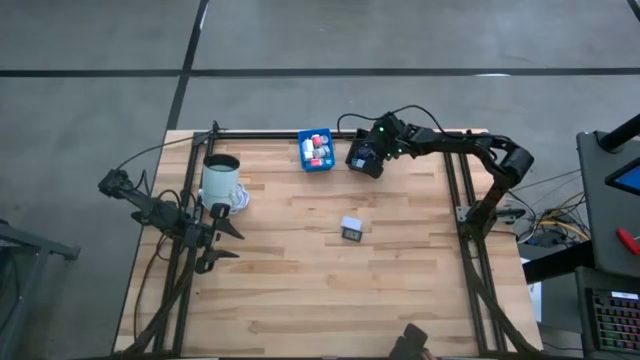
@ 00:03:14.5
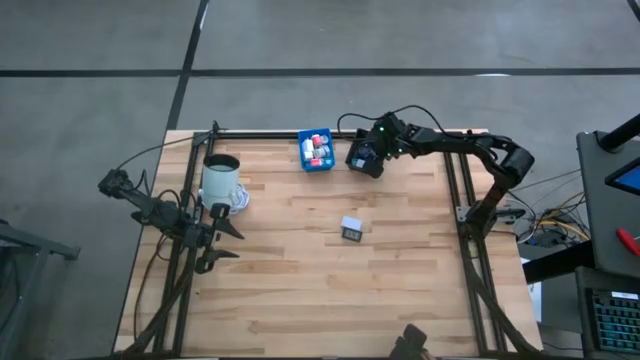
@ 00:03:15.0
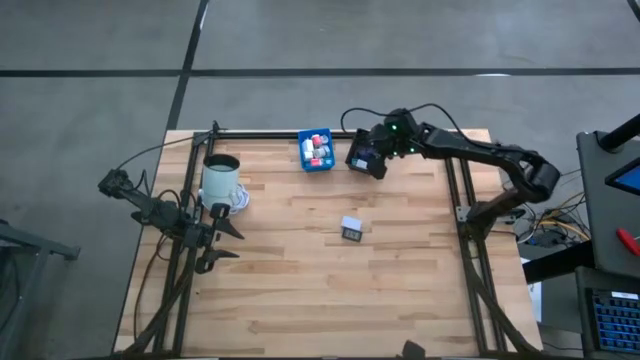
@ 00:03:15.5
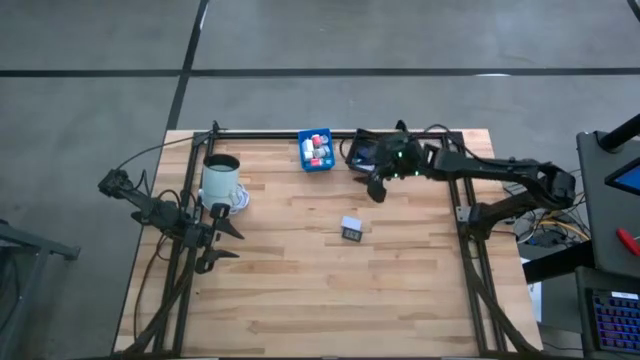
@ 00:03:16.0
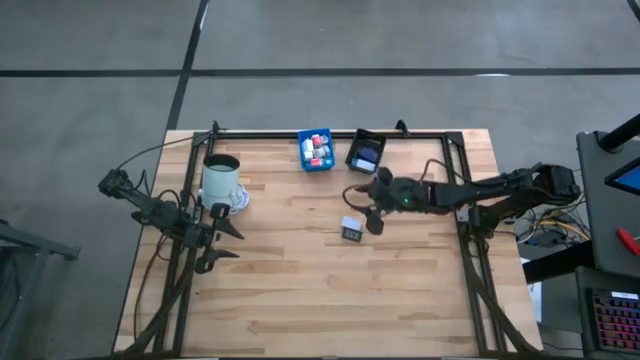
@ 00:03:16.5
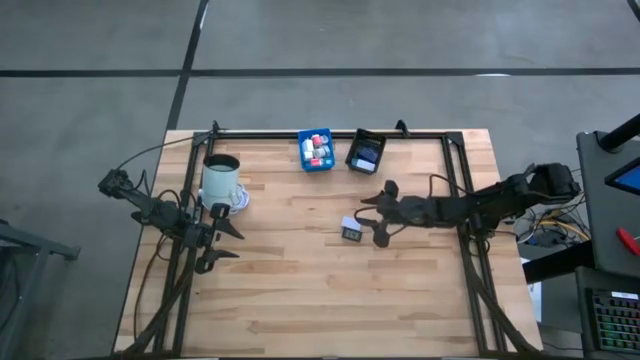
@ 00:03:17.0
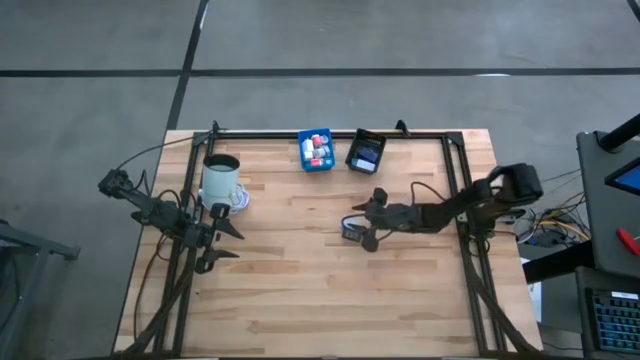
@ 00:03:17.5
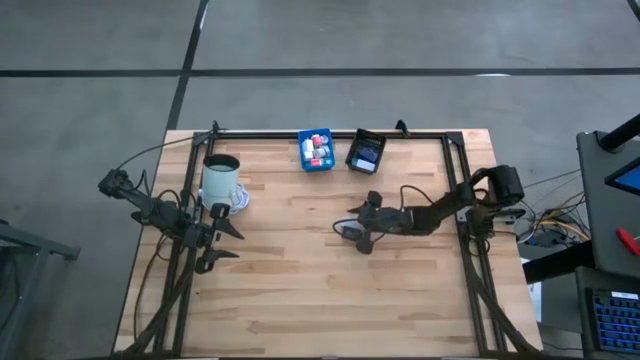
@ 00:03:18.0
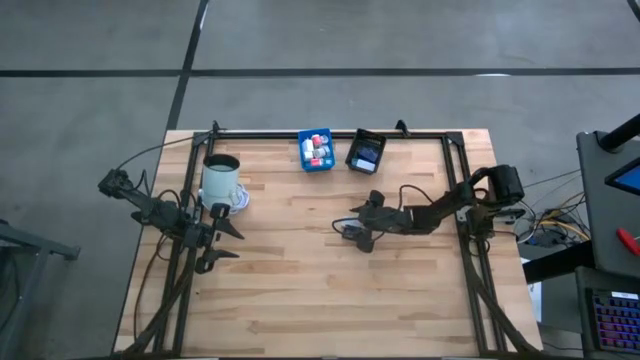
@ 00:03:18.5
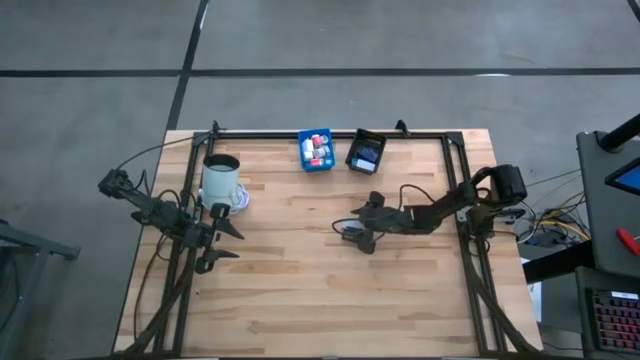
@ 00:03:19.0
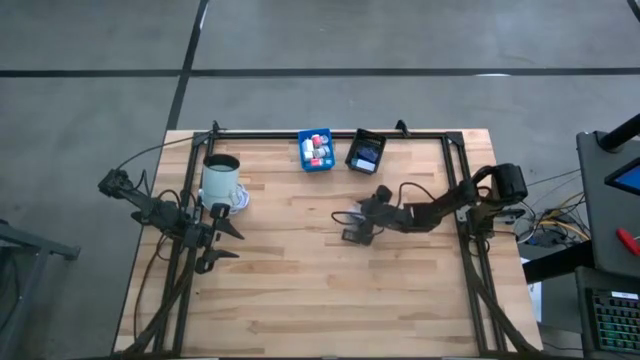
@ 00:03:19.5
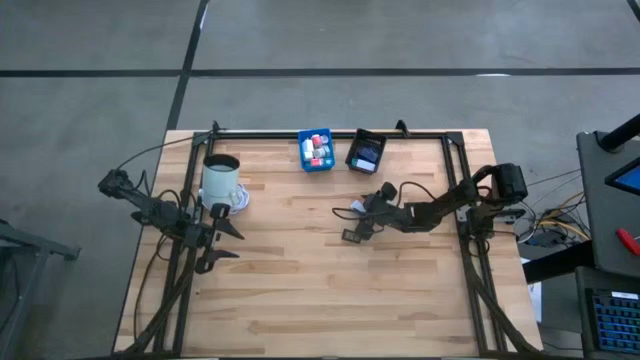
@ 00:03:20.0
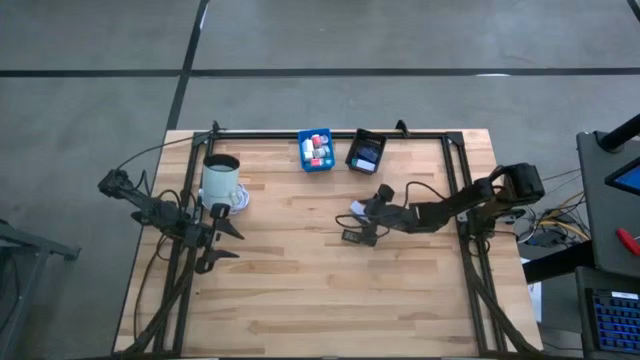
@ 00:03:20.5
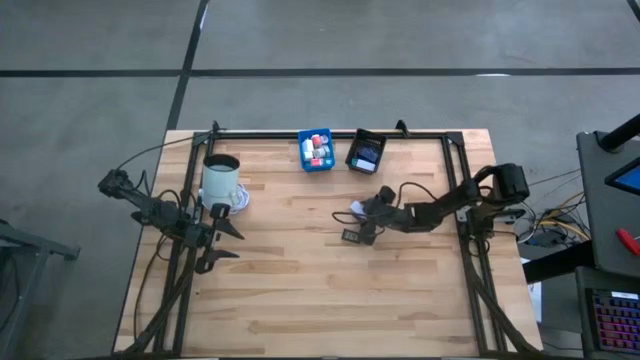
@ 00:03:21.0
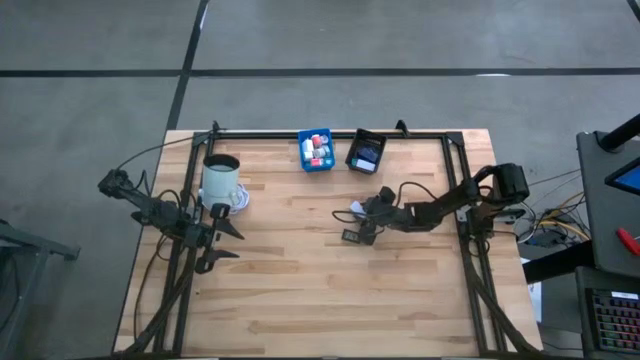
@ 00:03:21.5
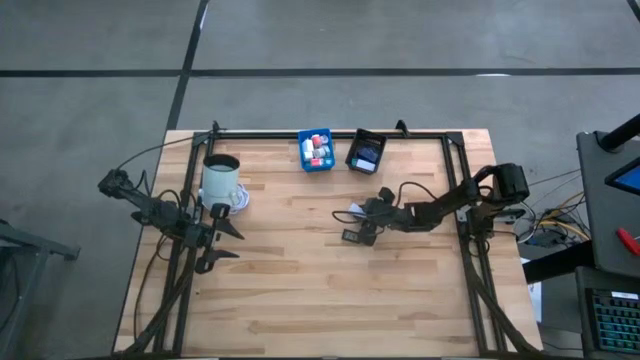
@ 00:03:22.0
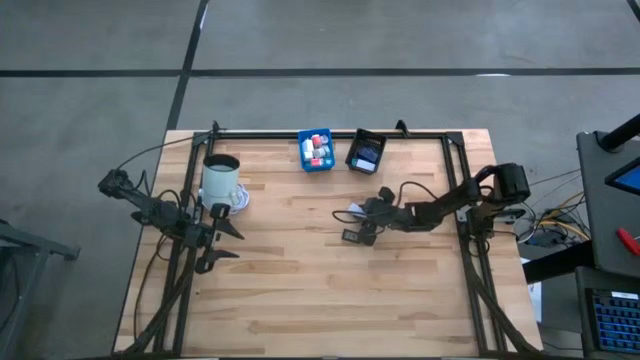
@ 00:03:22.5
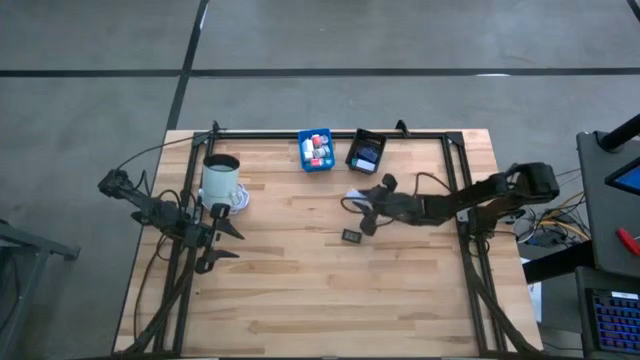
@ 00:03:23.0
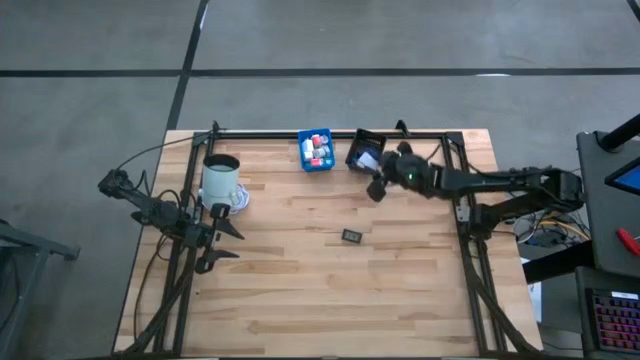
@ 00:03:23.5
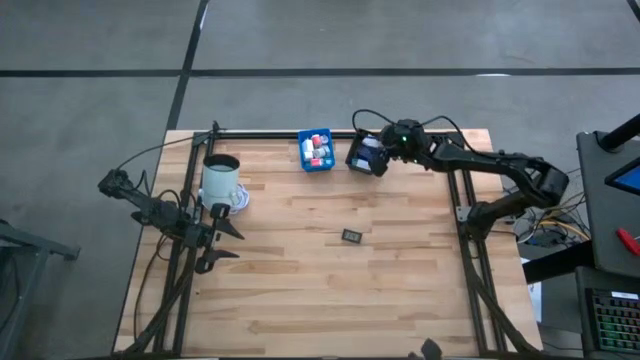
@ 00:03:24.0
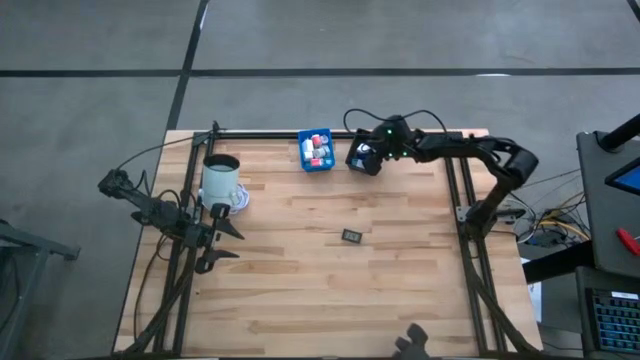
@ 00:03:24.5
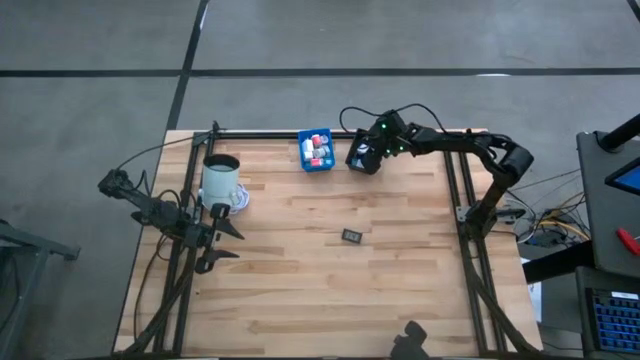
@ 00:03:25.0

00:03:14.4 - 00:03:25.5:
Task: Pick & Place Office items
Put the white digital clock into the black basket

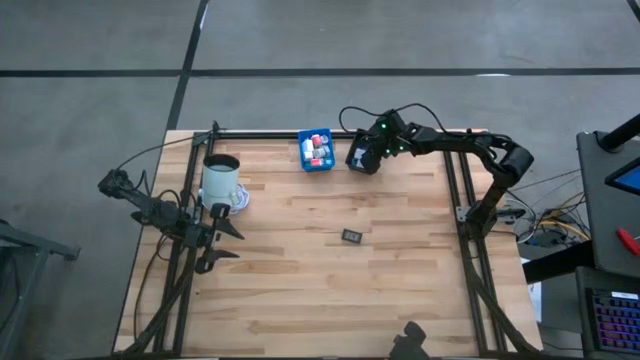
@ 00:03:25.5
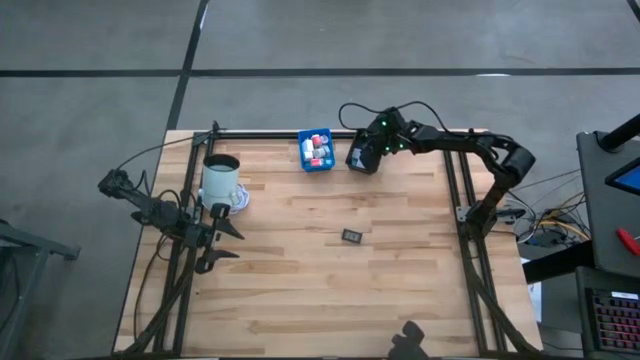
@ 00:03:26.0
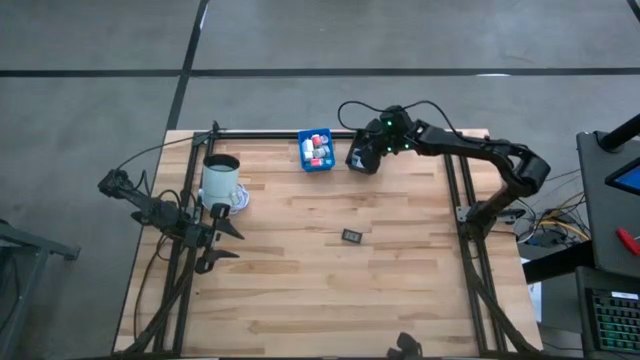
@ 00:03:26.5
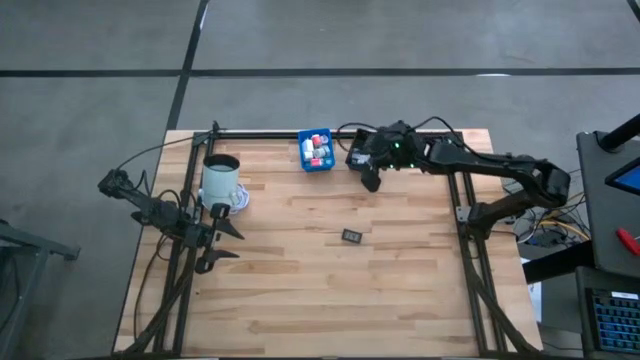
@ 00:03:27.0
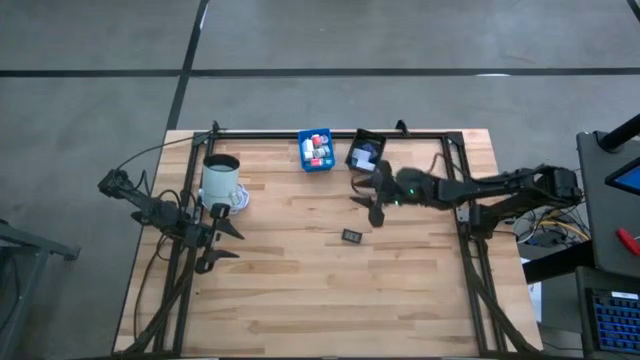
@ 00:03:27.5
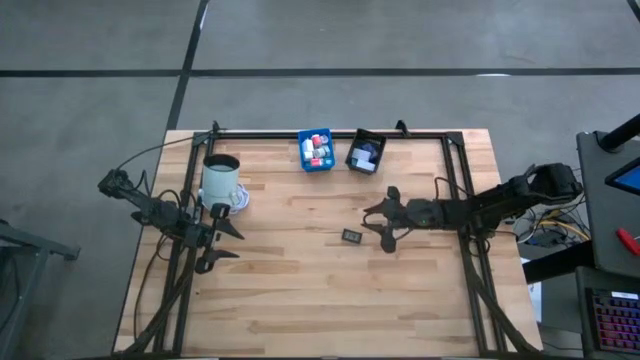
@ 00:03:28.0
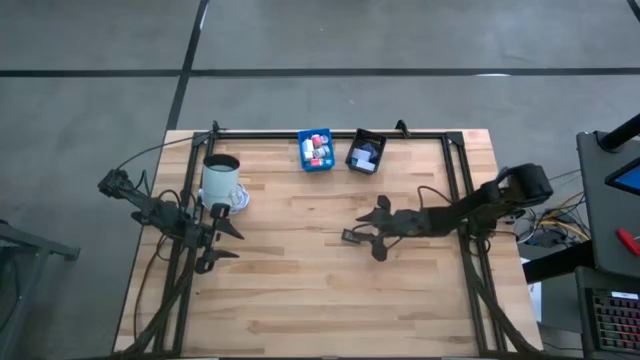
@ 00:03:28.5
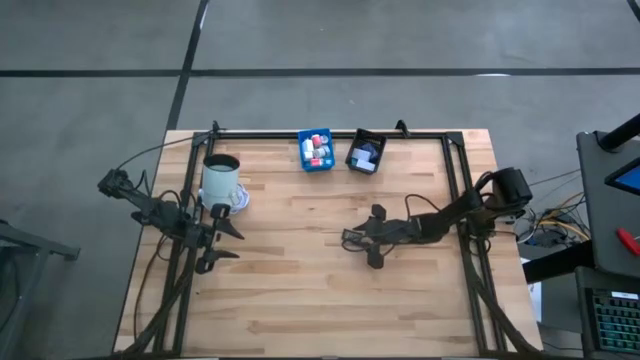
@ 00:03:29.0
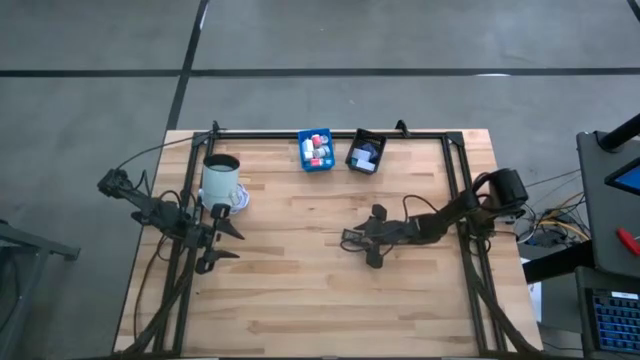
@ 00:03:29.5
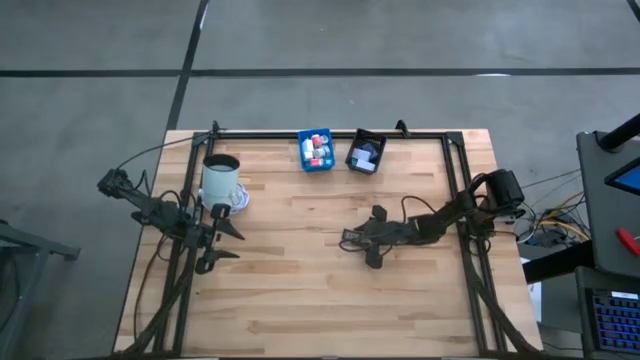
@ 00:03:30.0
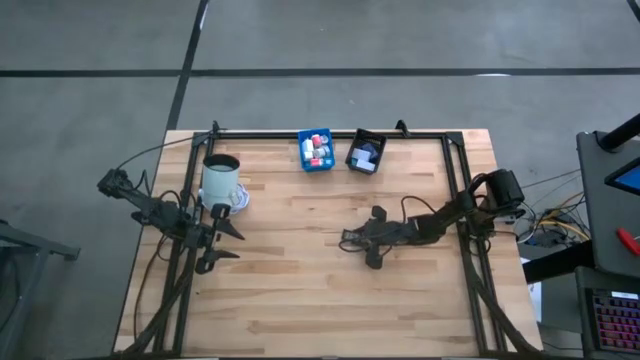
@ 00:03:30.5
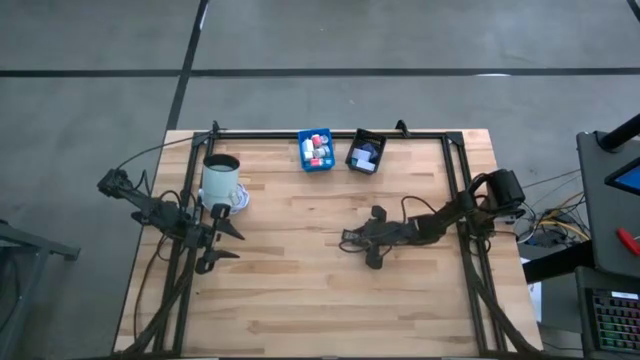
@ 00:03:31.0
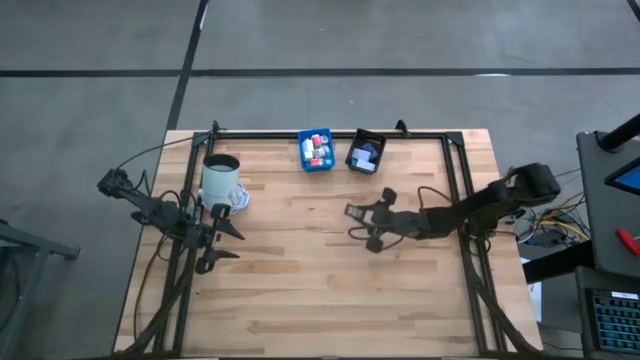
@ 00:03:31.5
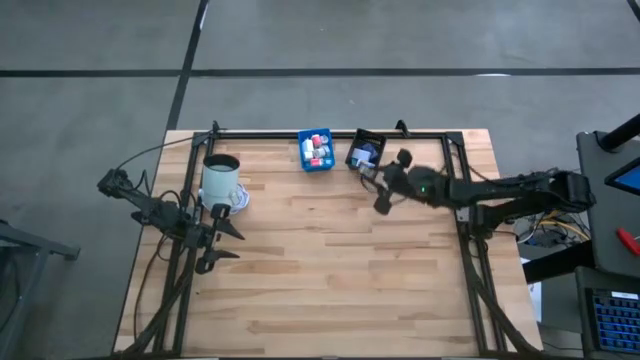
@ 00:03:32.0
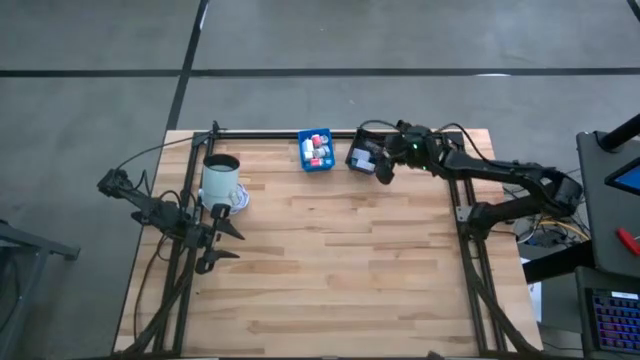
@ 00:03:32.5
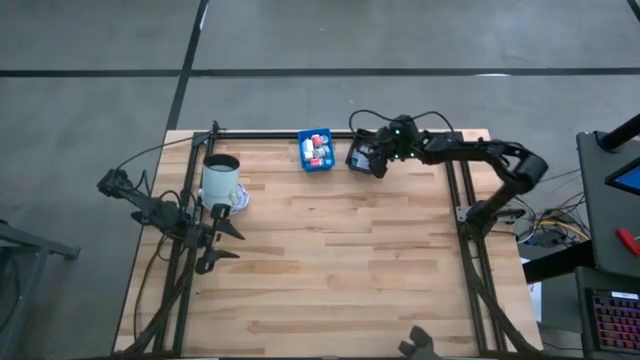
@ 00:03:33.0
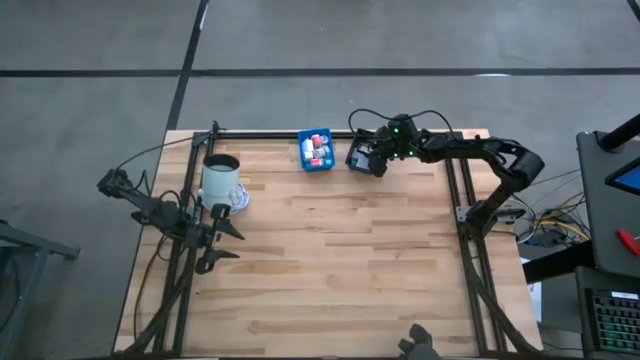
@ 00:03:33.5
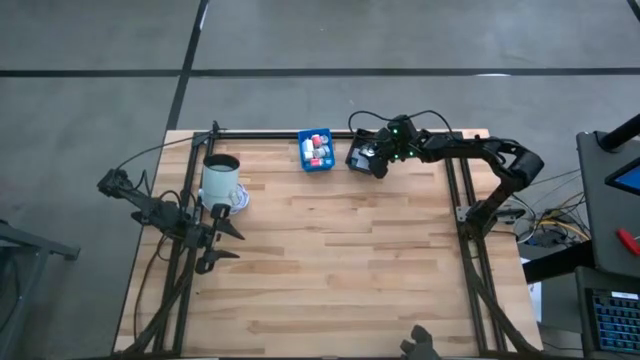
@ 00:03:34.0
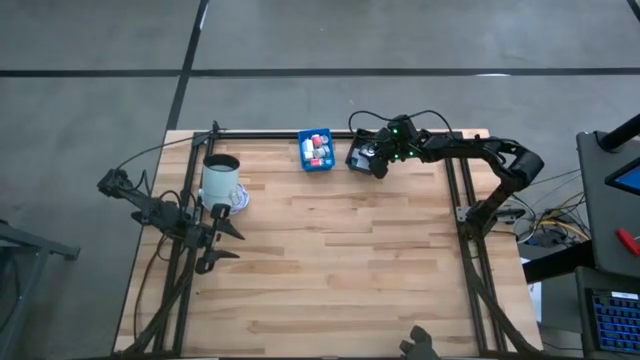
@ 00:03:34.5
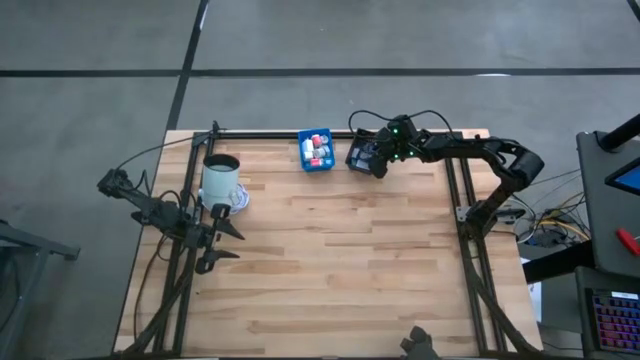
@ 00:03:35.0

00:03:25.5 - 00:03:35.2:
Put the black digital clock into the black basket
